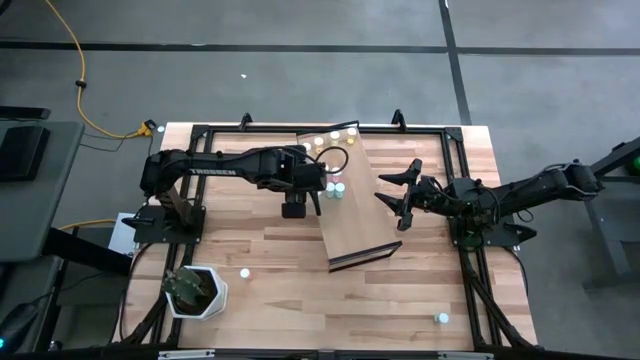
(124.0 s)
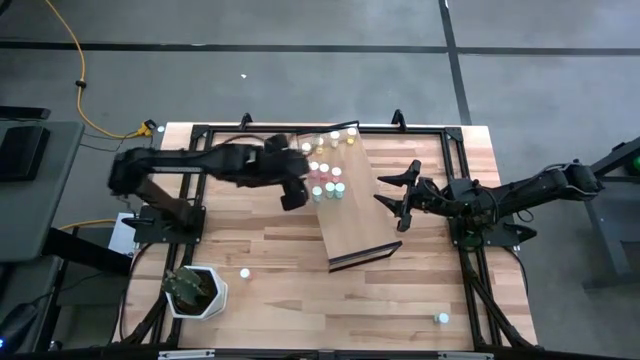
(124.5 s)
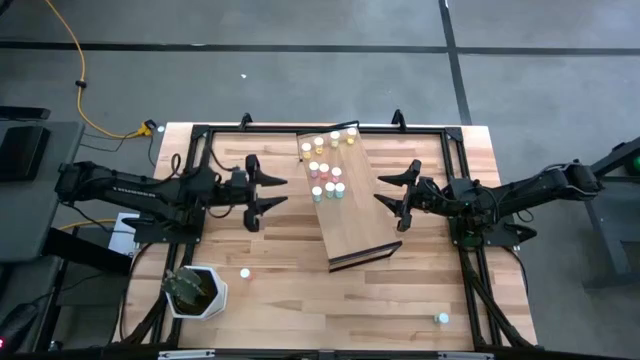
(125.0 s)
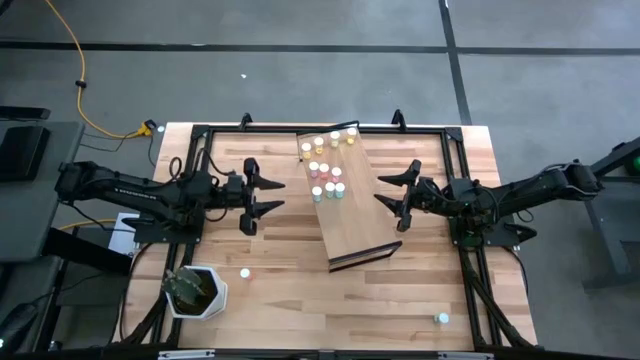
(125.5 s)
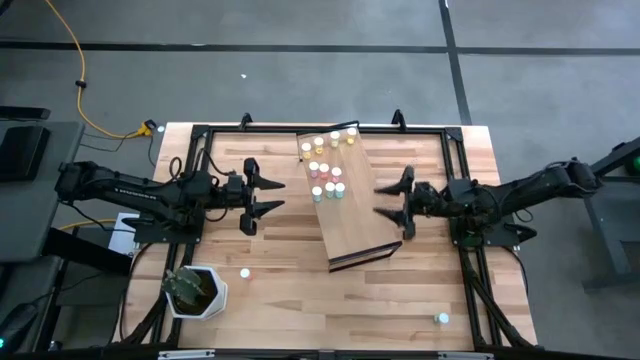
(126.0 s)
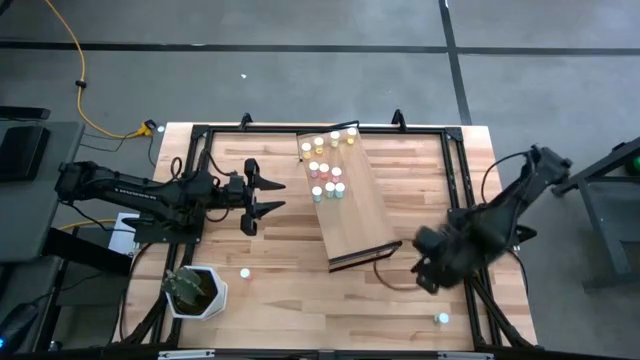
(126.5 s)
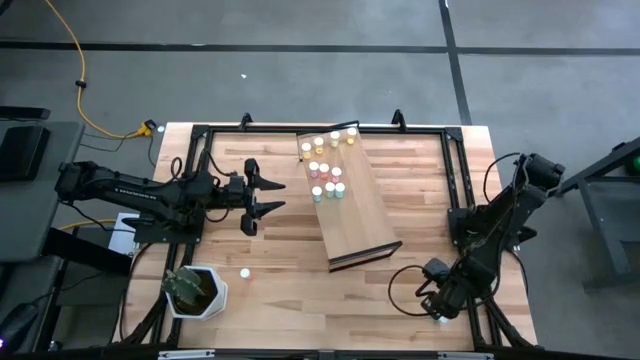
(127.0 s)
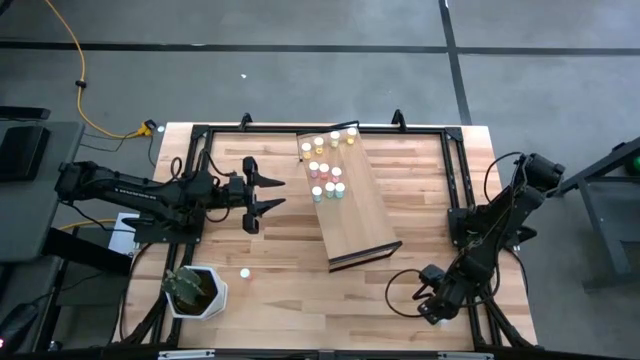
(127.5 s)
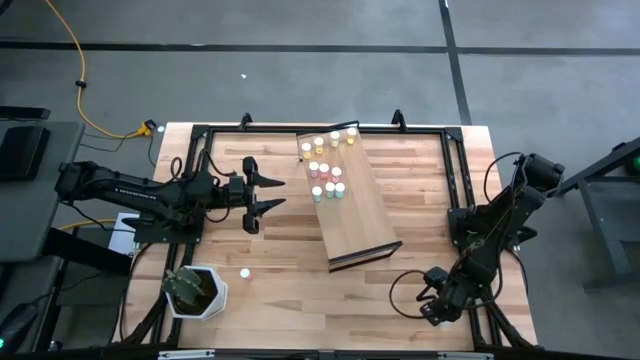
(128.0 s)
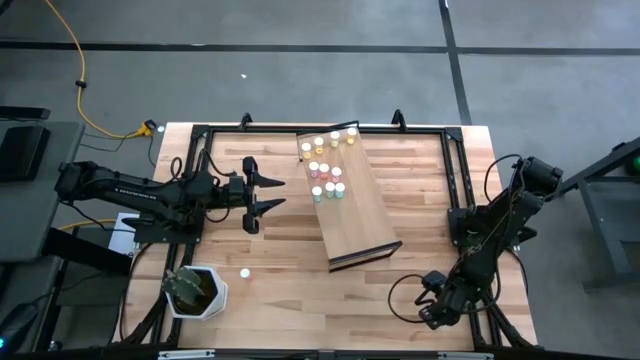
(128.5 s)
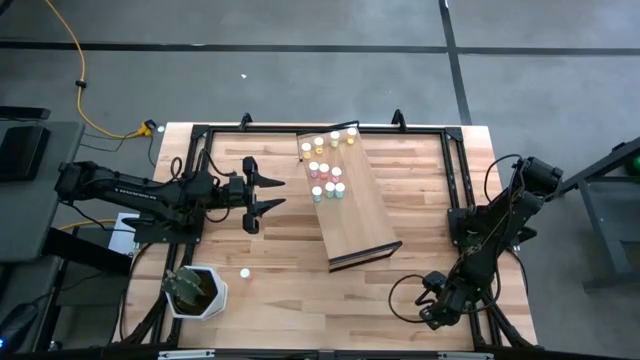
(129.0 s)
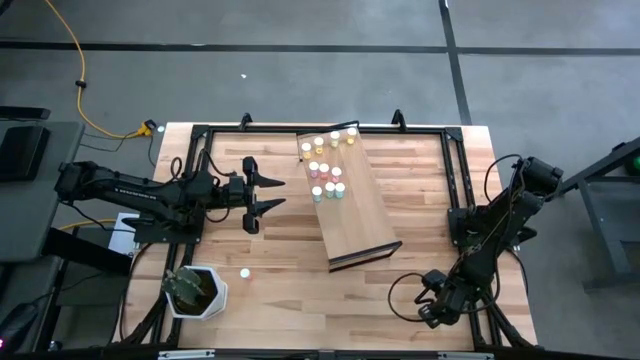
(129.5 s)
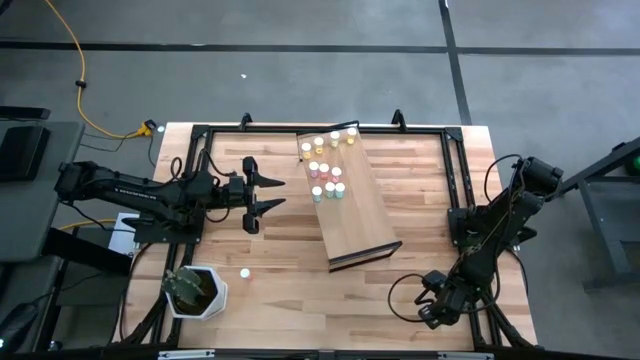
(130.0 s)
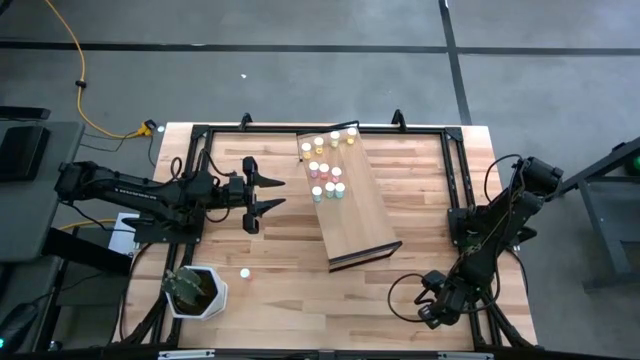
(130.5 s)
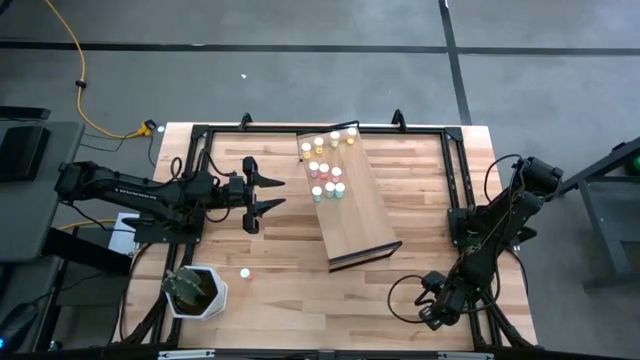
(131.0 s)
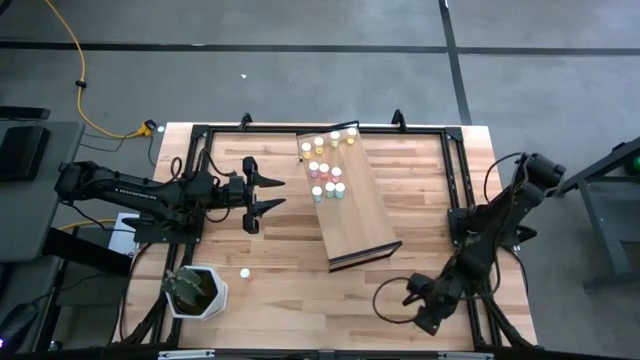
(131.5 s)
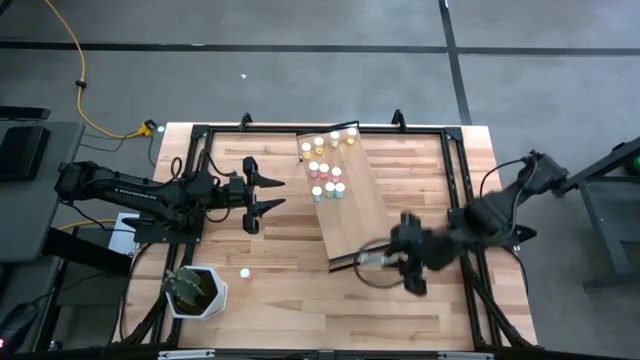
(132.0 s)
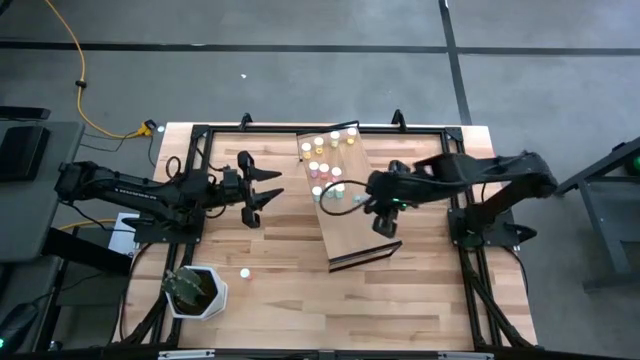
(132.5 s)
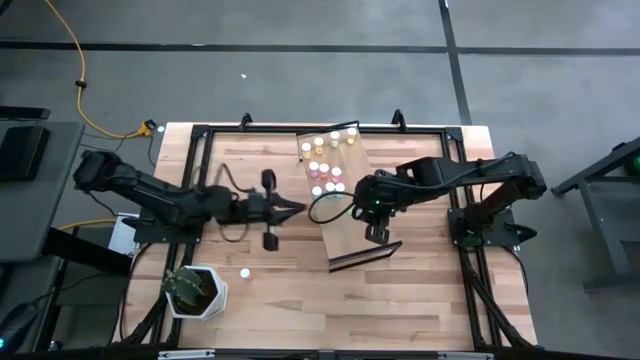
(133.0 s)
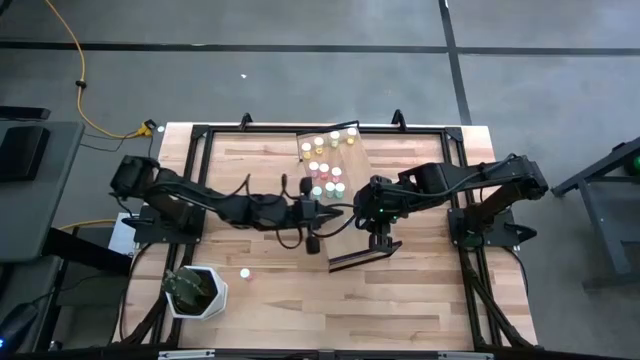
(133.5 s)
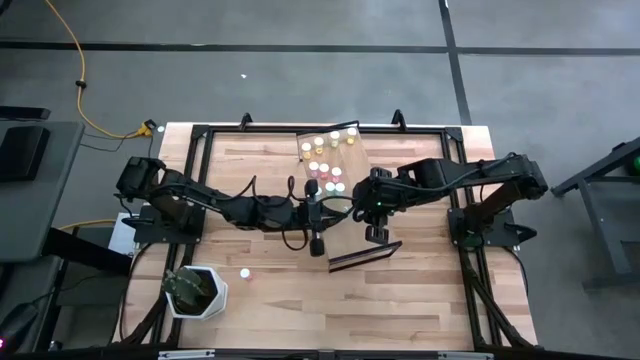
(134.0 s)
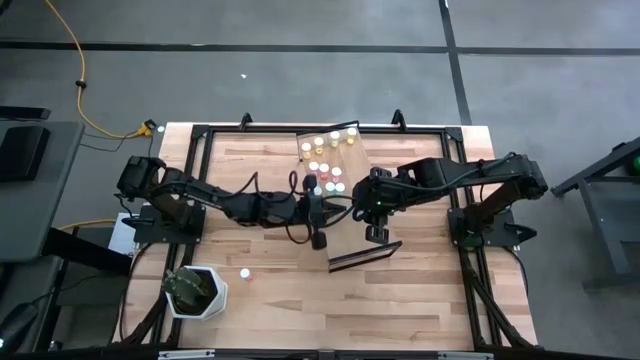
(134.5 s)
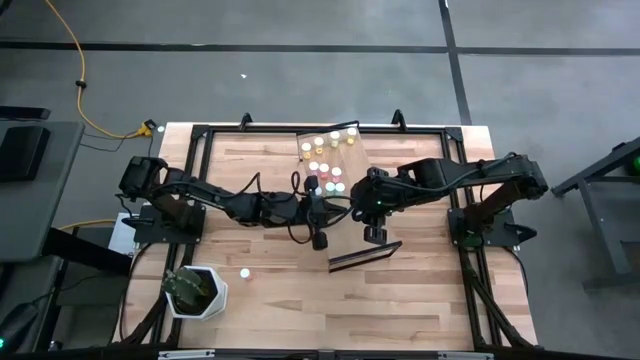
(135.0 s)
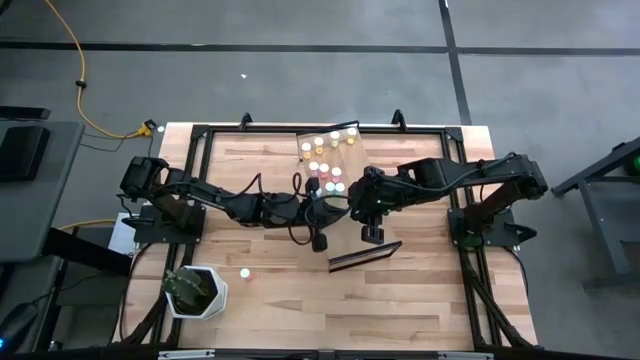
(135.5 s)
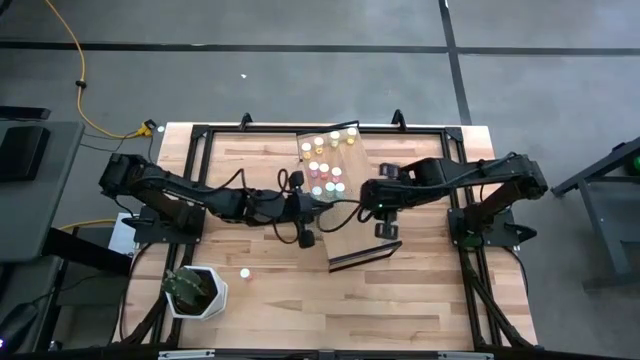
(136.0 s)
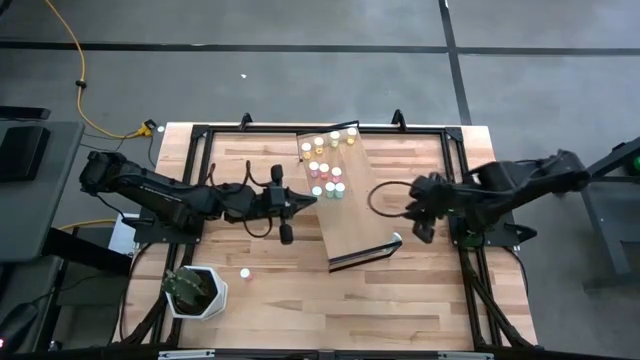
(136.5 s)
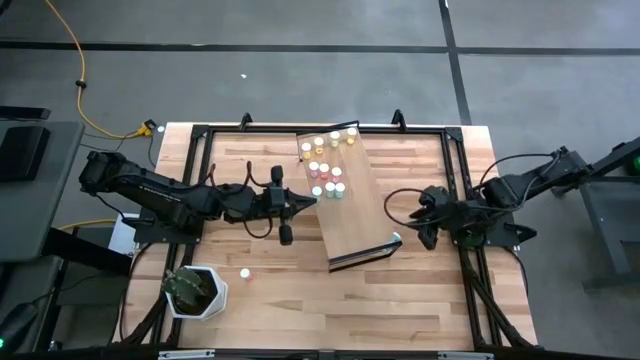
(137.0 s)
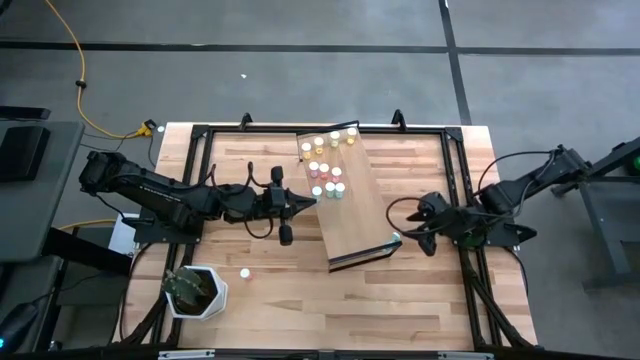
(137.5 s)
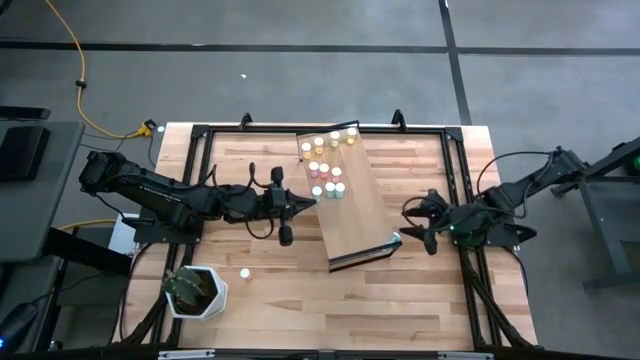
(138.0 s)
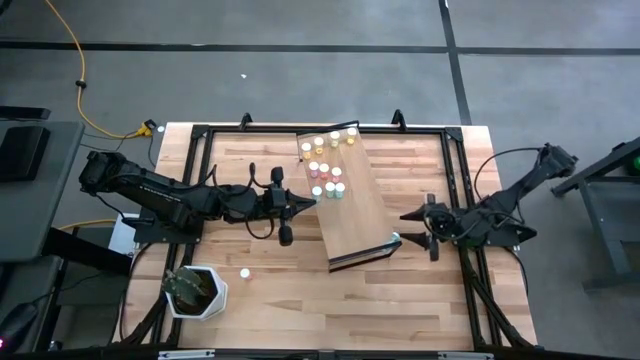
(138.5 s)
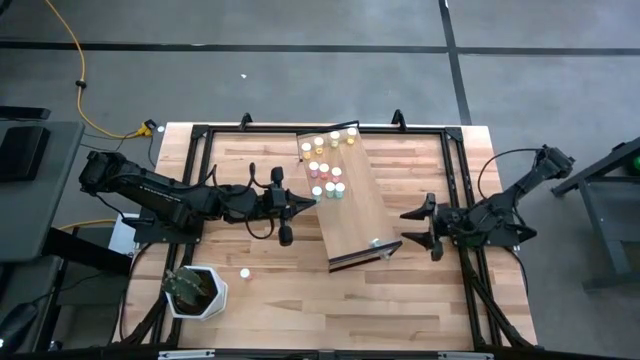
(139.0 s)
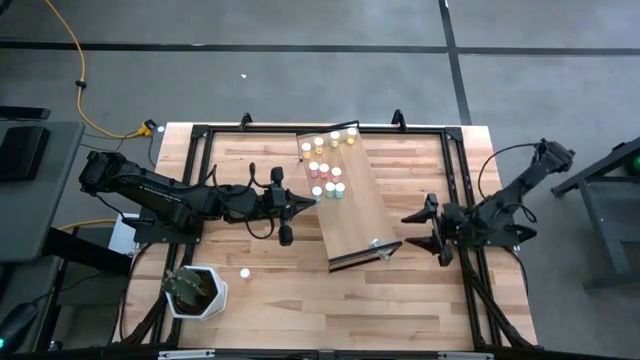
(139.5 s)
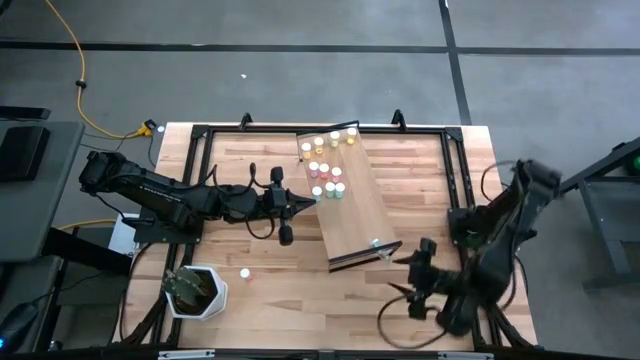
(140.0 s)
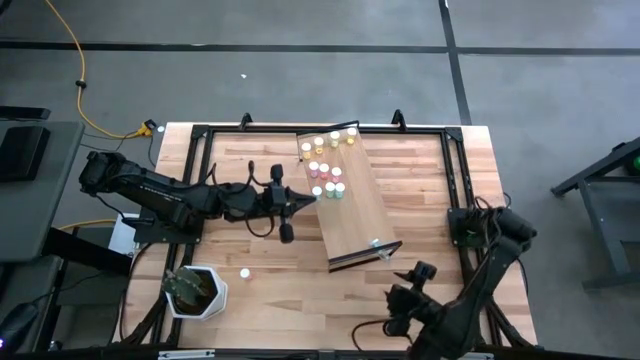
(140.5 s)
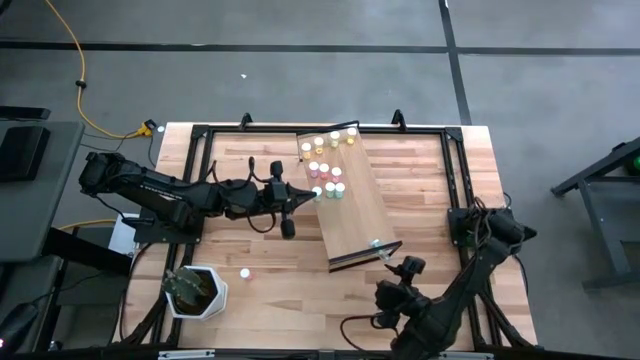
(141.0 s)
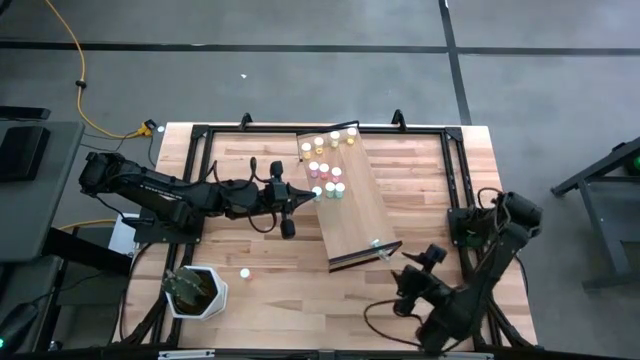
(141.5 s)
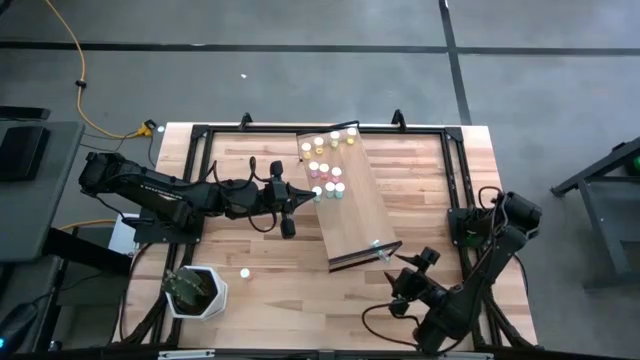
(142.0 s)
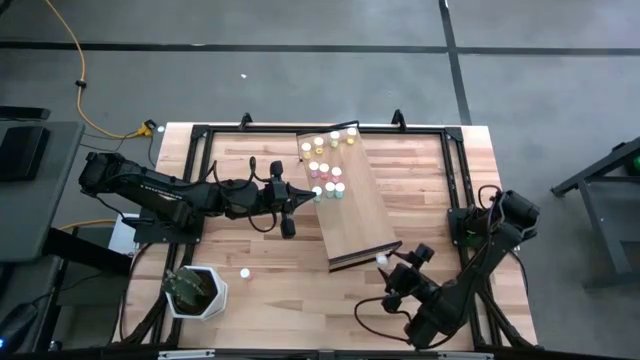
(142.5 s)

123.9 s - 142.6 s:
Task: Pick and place medicine bottles onto shelf by color
Put the blue pill bottle on the shelf aligned with the other blue pill bottles

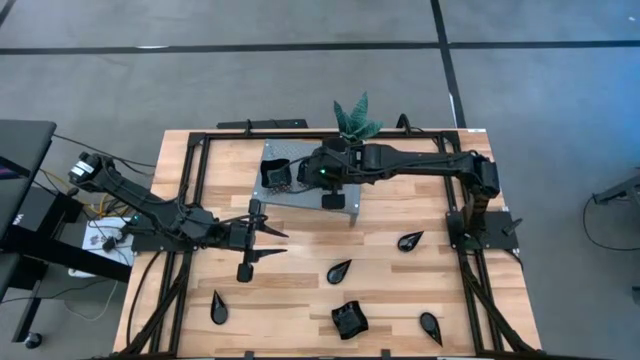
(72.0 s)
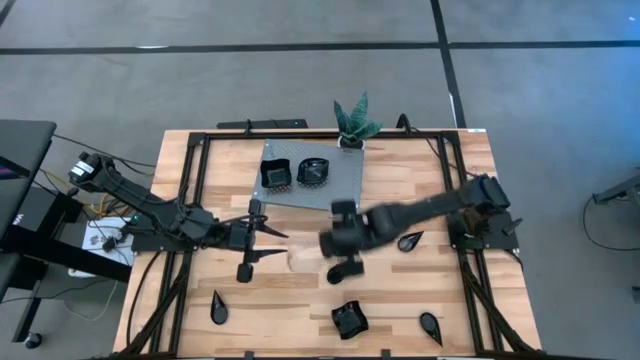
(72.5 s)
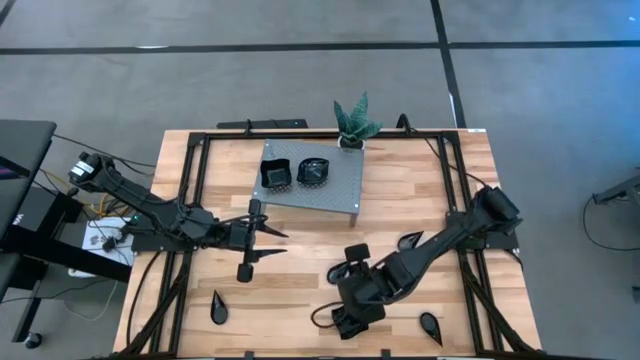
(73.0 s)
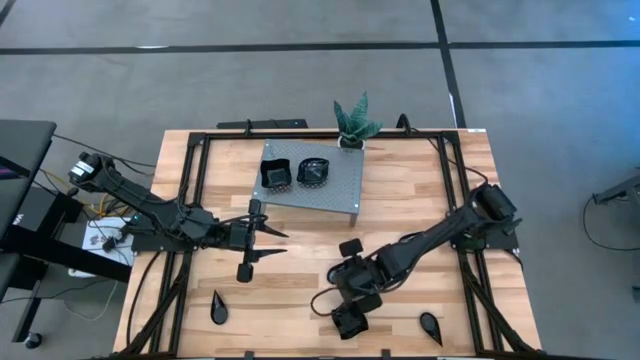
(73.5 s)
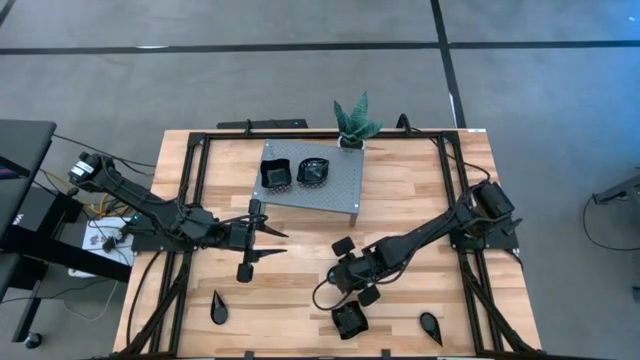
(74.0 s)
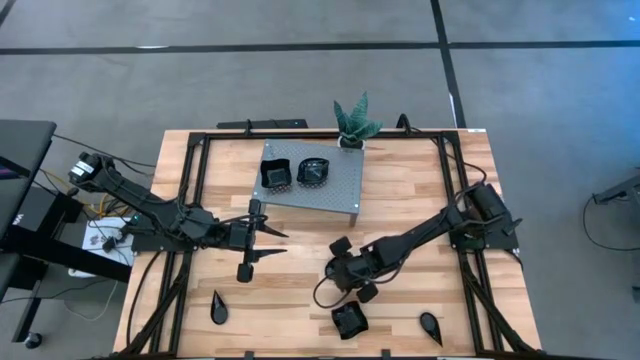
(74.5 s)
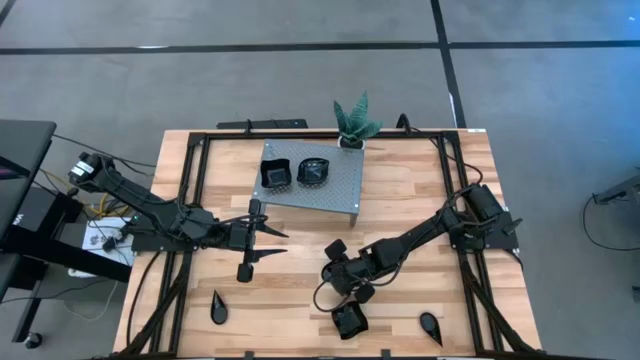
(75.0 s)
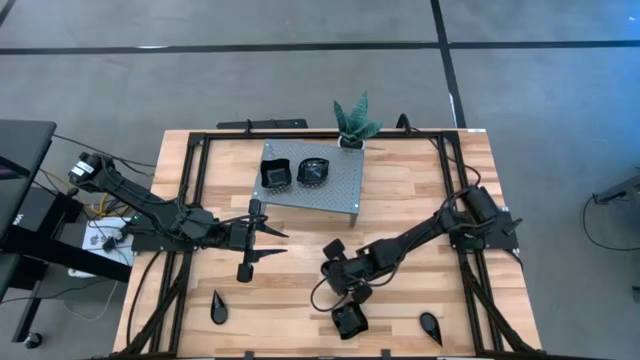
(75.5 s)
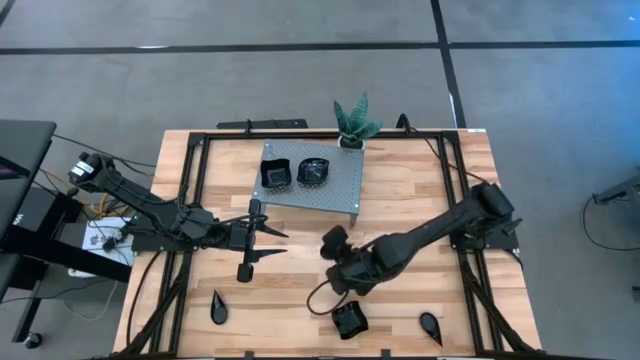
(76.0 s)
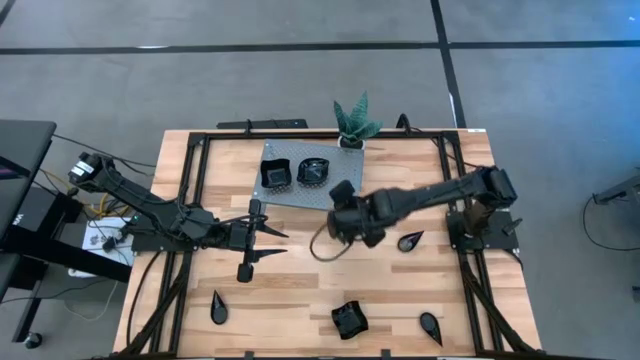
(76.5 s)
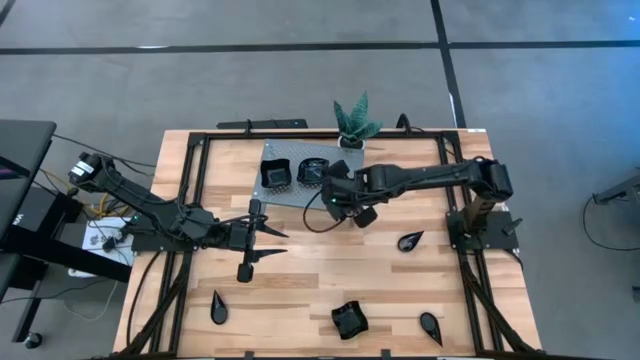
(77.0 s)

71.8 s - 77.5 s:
Task: Pick & Place Mini shaped plates
Put the black drop shaped plate on the shelf
